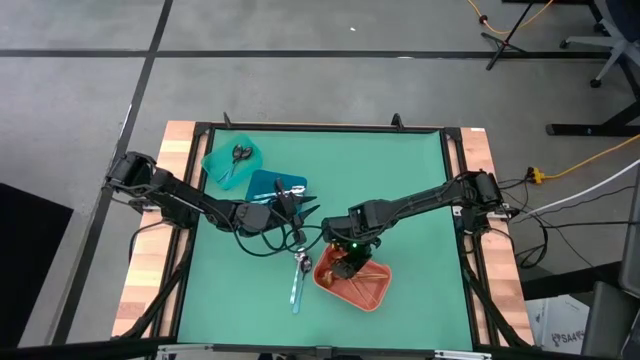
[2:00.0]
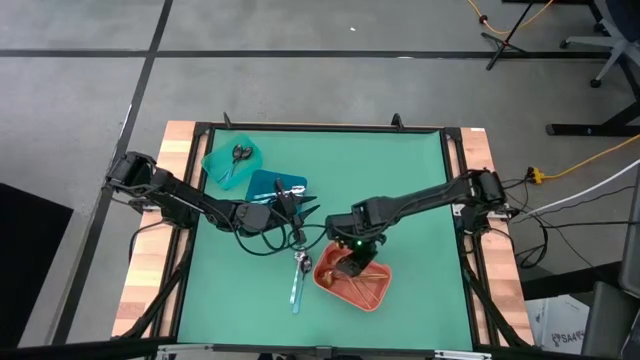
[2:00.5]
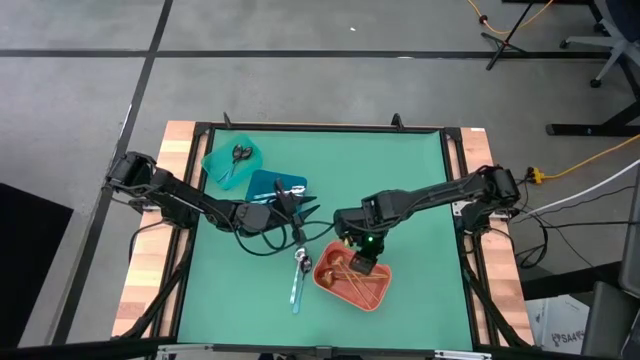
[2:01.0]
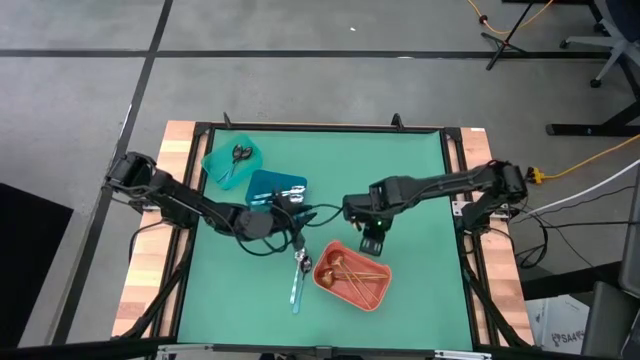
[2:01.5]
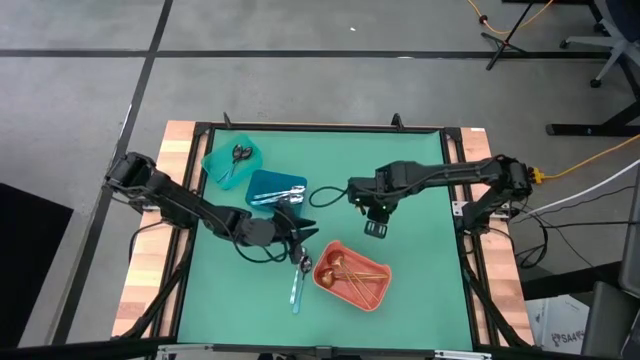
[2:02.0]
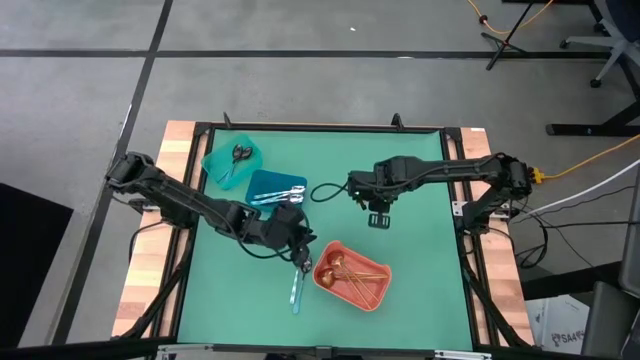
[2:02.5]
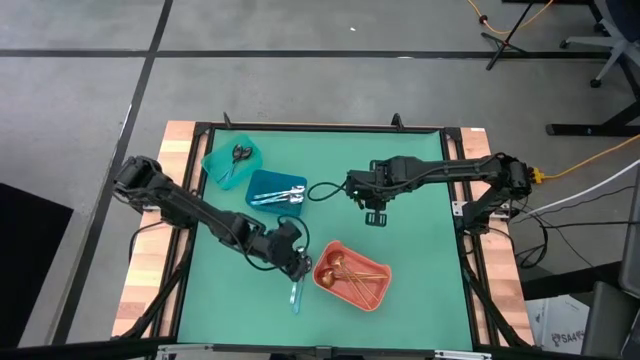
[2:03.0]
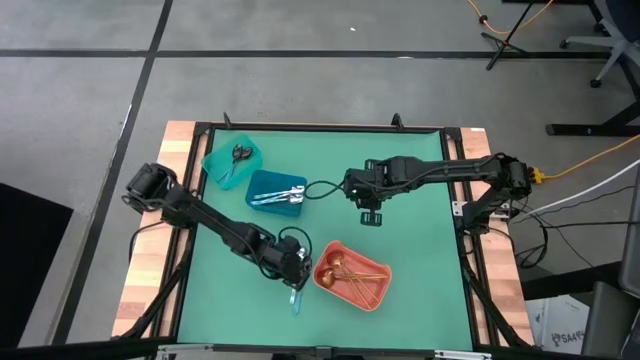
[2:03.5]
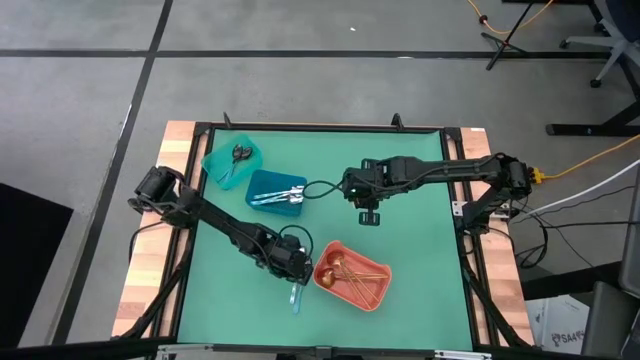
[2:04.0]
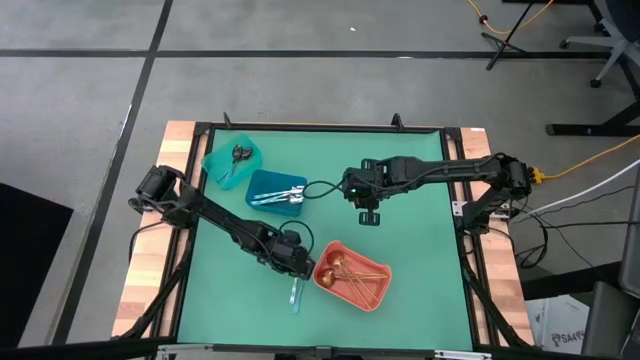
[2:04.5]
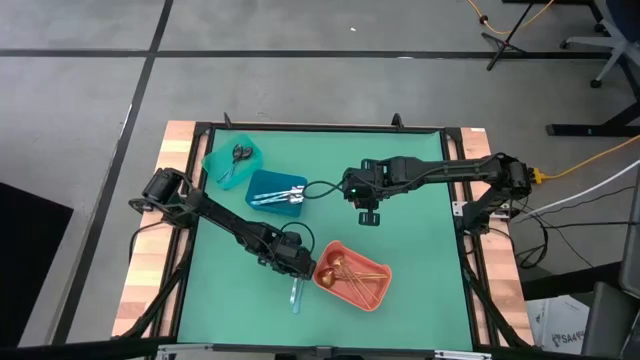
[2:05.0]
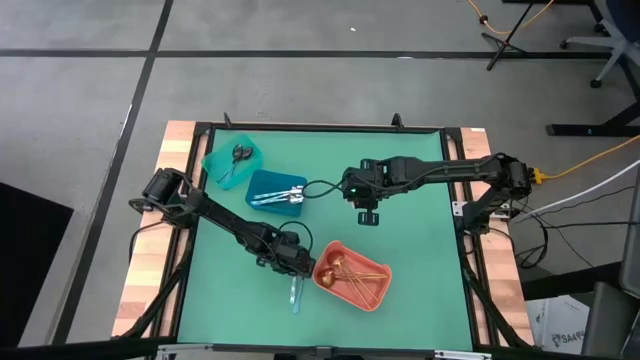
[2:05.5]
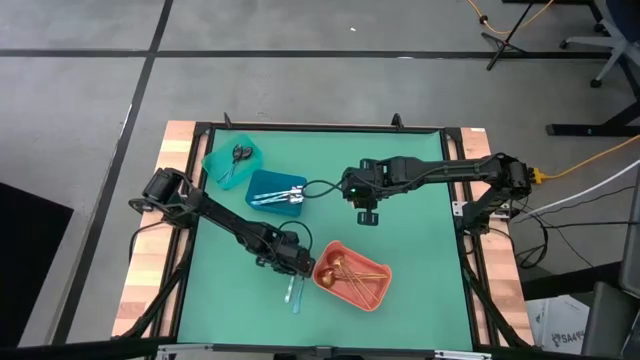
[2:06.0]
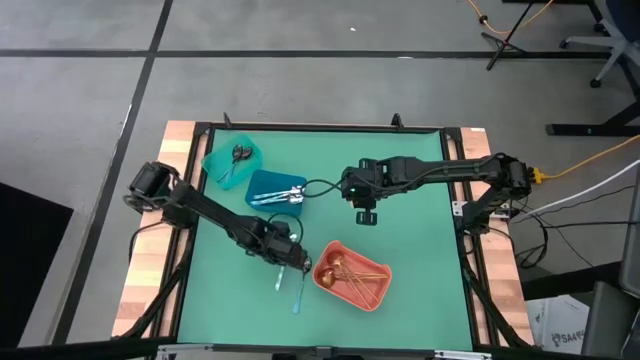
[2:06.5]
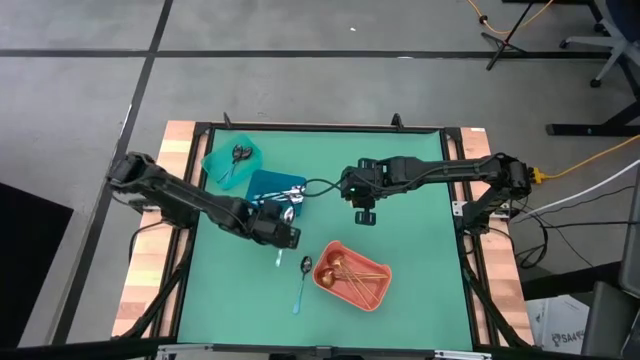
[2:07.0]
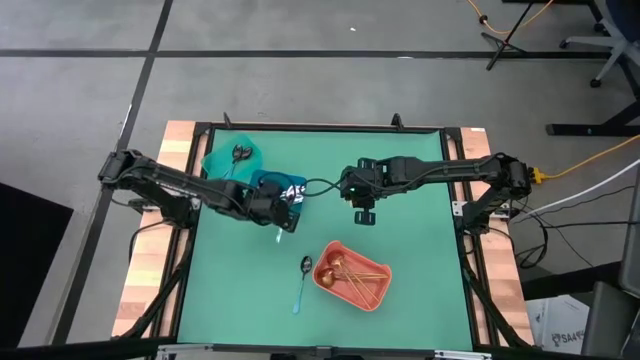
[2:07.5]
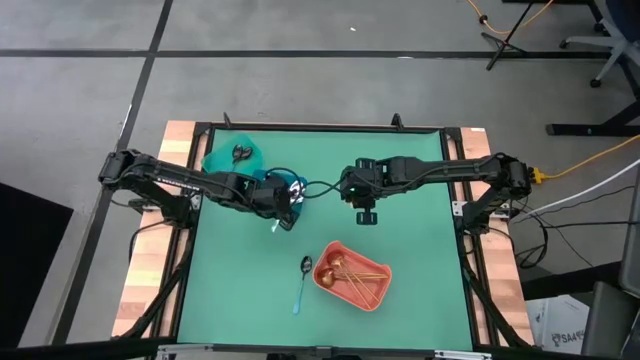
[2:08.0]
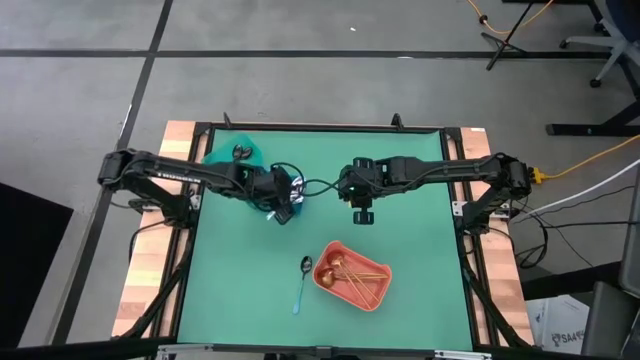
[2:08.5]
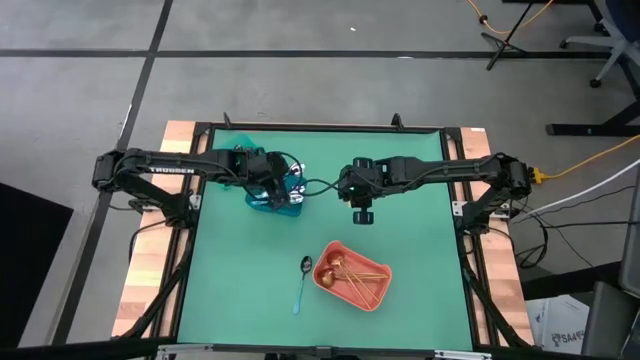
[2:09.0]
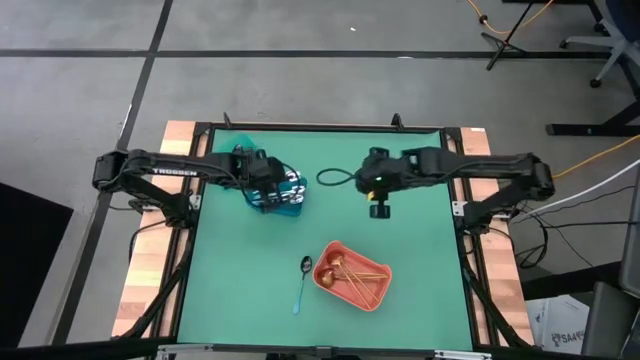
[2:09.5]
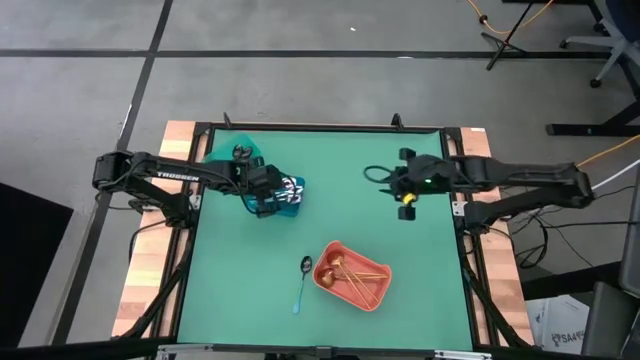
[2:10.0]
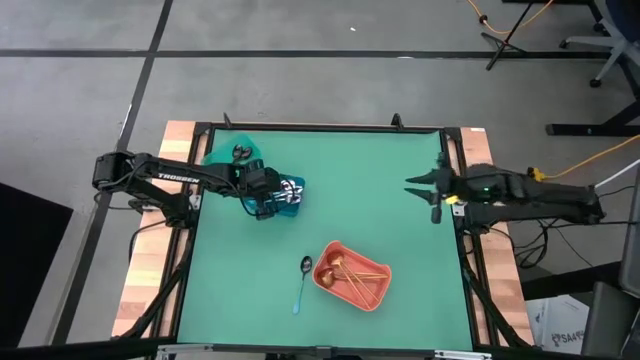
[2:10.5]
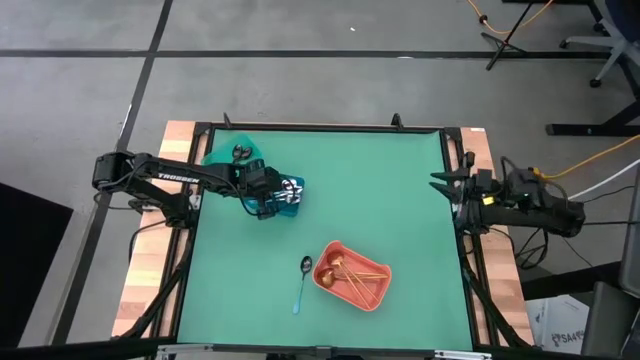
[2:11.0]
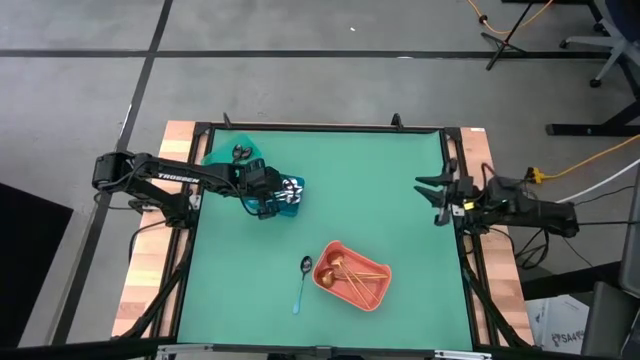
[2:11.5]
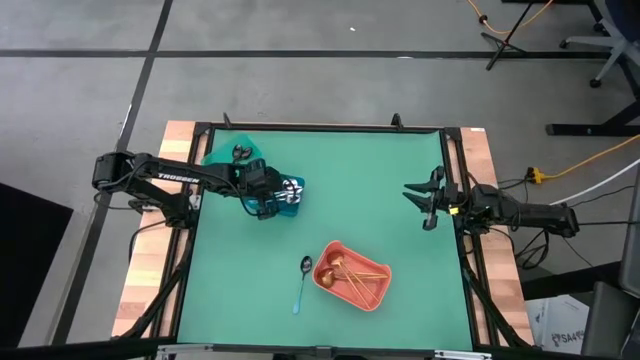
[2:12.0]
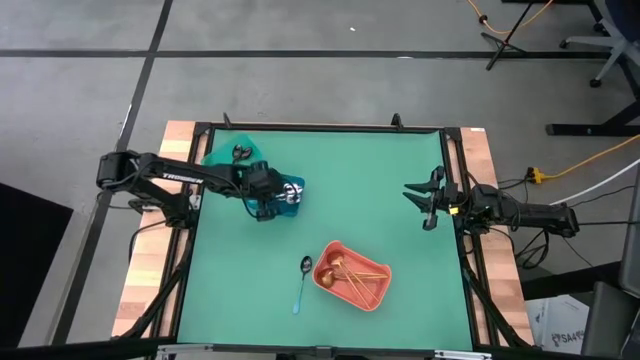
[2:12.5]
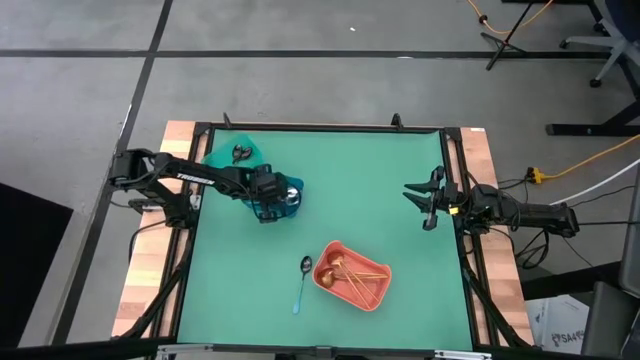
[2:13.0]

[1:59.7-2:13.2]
Task: Sort silverware by color (type)
Put the patterned blue spoon into the blue bin

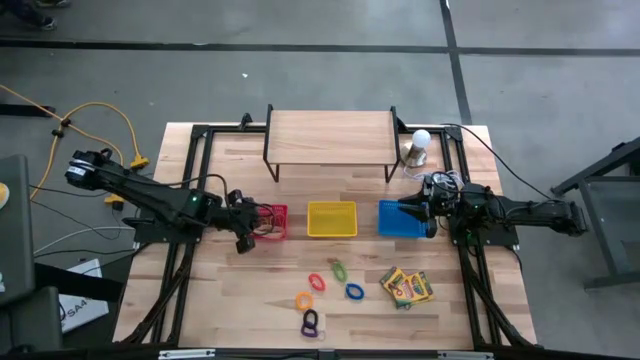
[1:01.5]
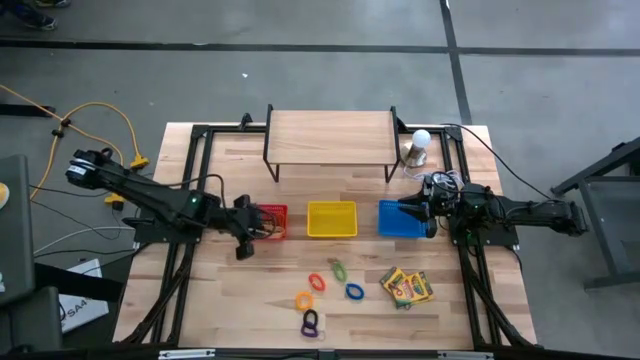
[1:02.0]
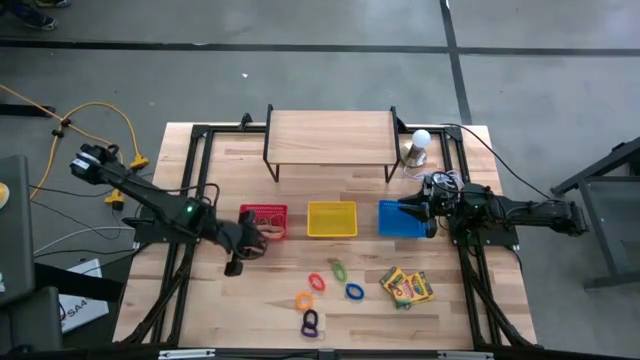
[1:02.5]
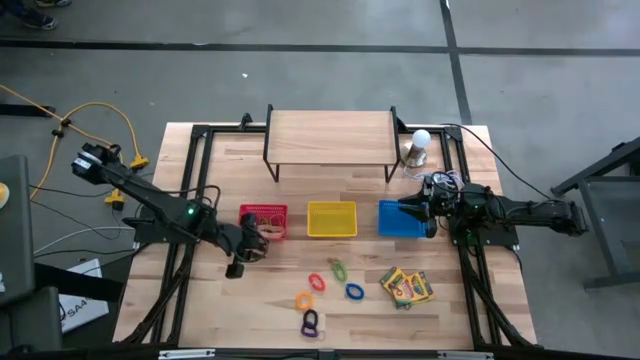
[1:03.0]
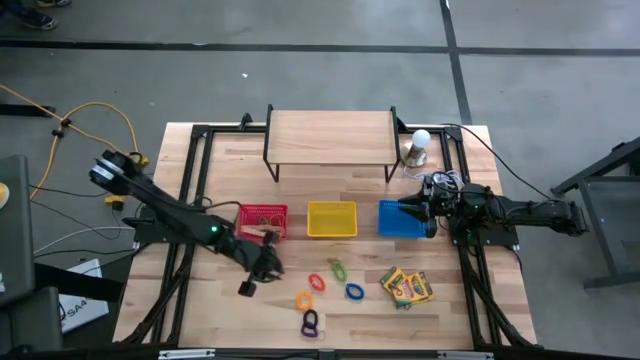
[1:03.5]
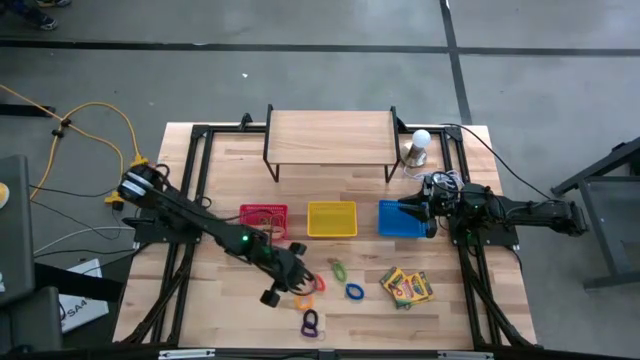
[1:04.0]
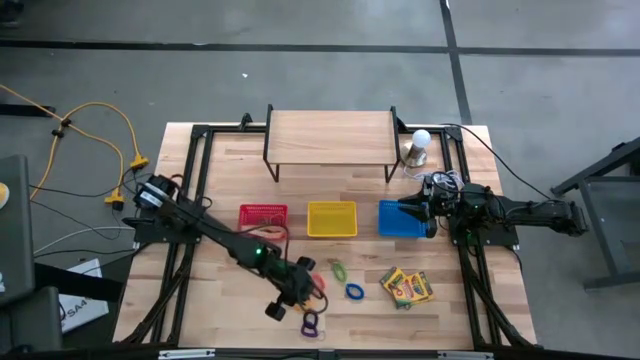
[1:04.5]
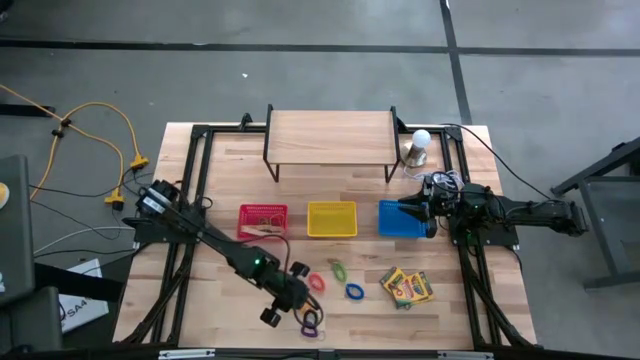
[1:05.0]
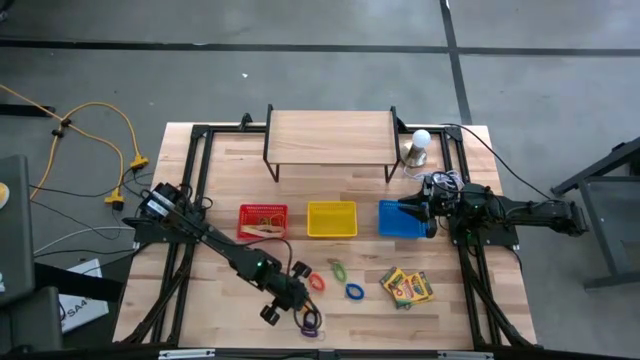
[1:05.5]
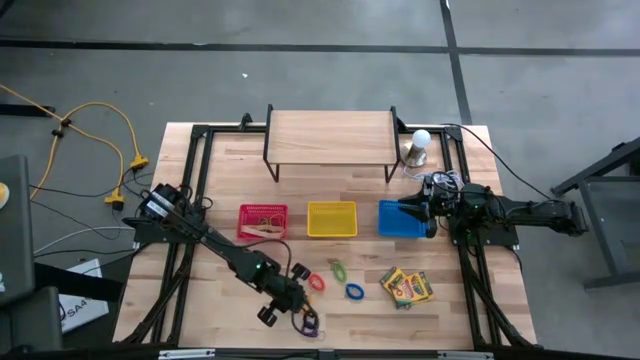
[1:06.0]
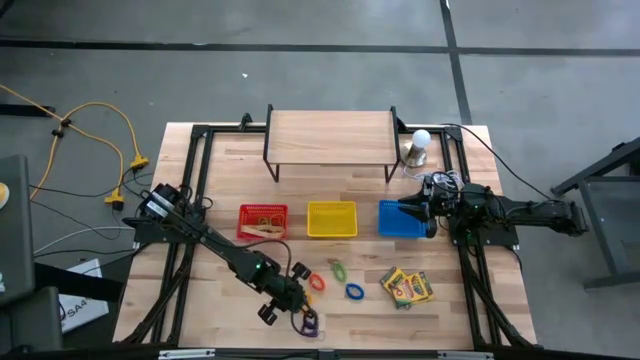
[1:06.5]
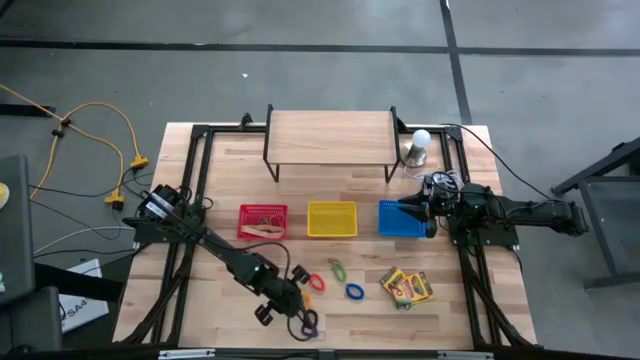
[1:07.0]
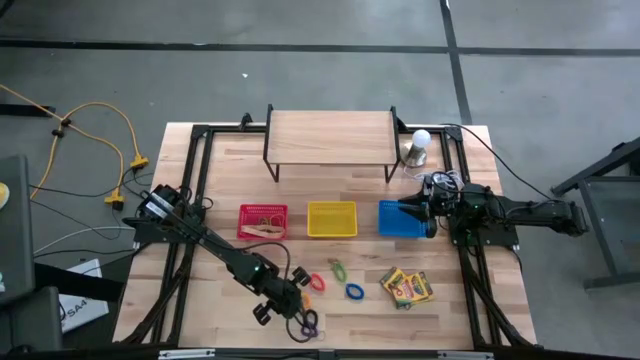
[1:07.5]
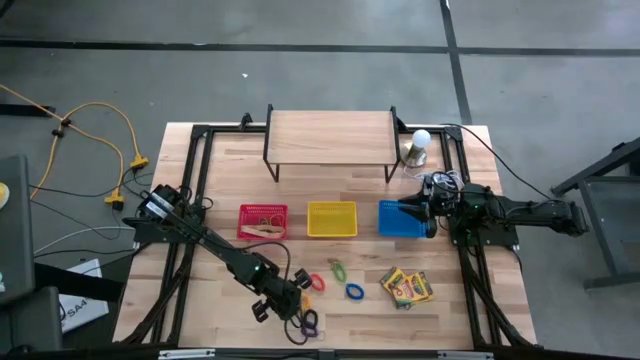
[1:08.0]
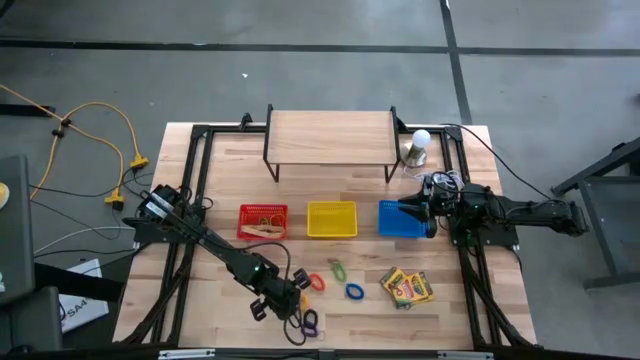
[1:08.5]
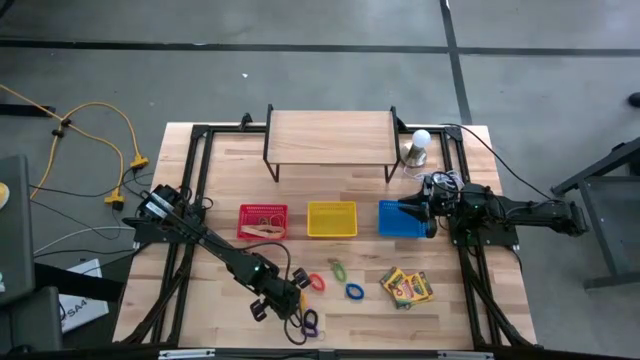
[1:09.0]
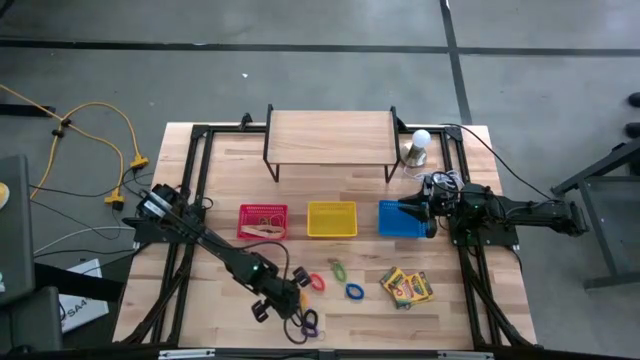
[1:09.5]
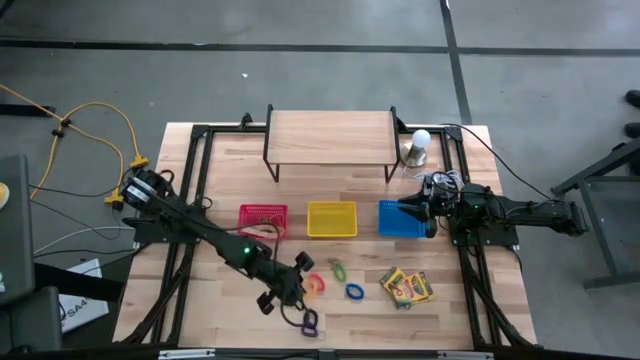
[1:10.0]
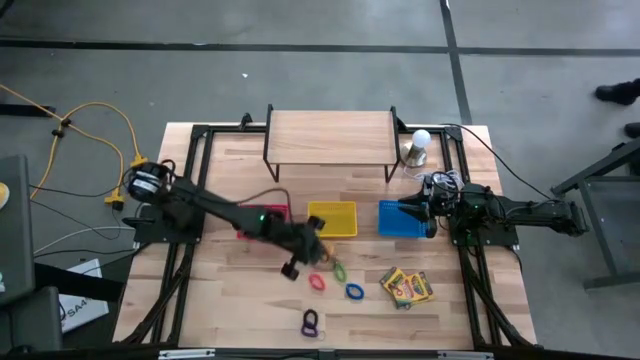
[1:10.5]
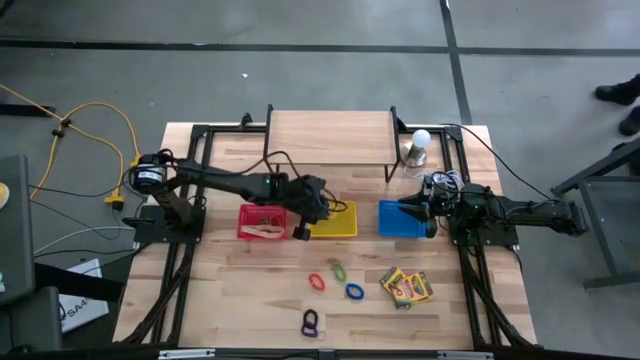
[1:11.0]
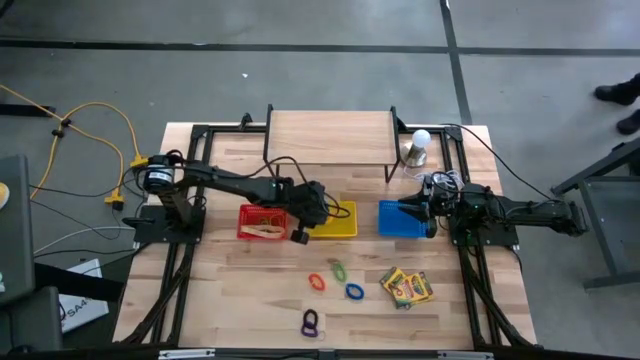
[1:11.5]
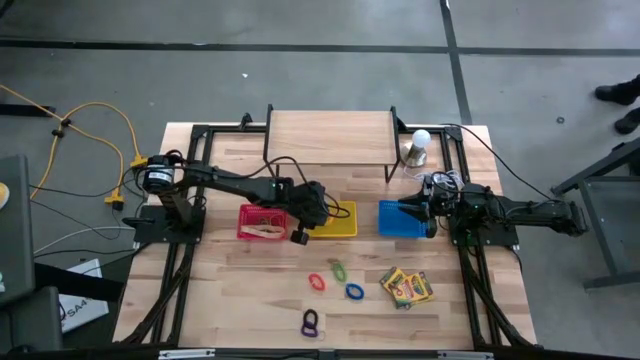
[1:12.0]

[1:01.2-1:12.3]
Task: Pick & Place Office Desk Supplies
Put the yellow spring keychain into the yellow bin
